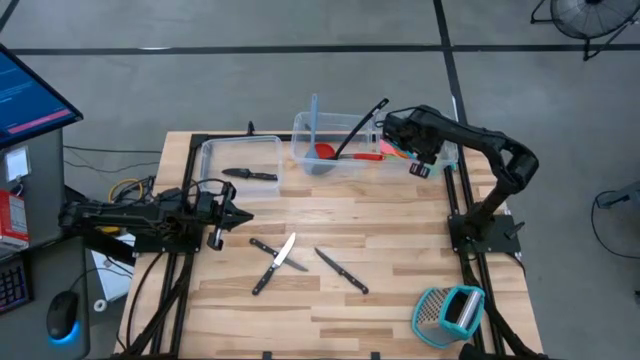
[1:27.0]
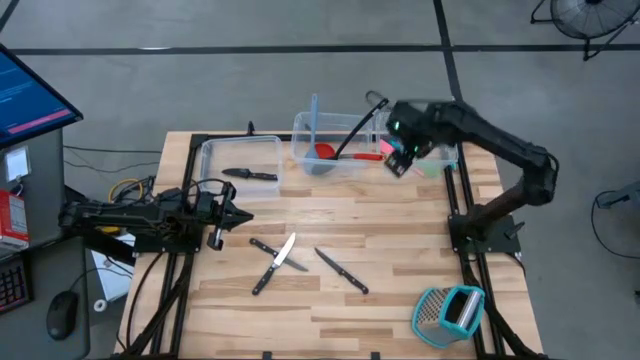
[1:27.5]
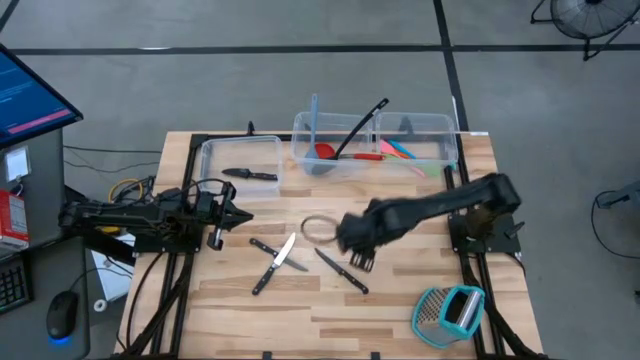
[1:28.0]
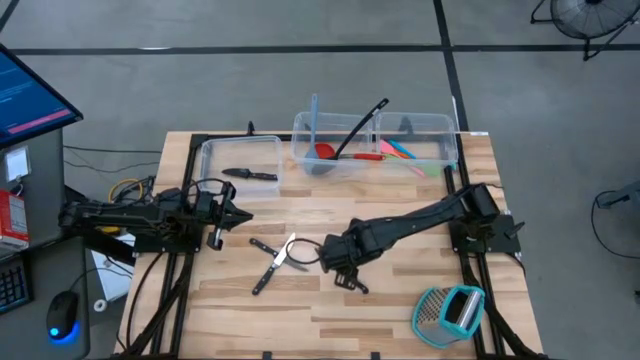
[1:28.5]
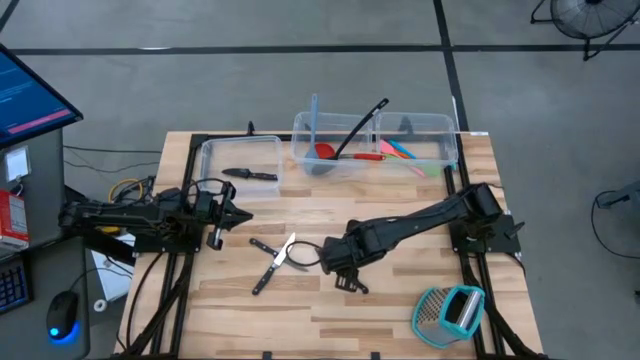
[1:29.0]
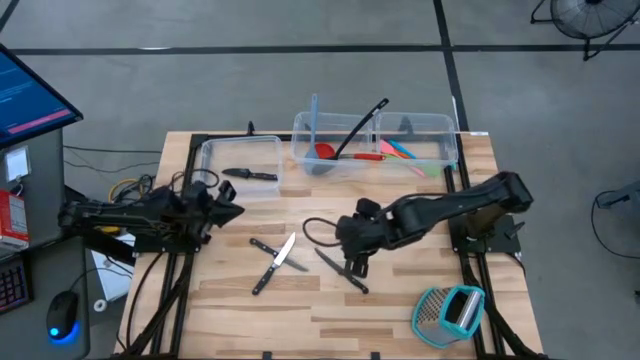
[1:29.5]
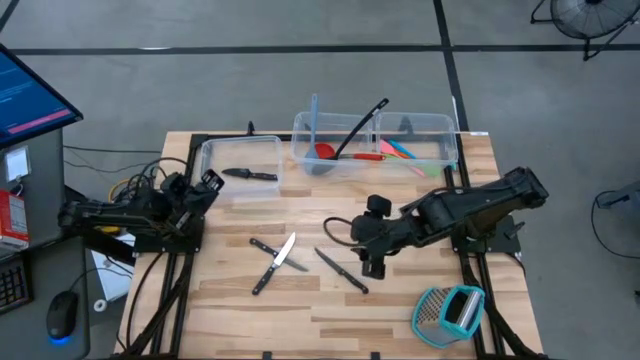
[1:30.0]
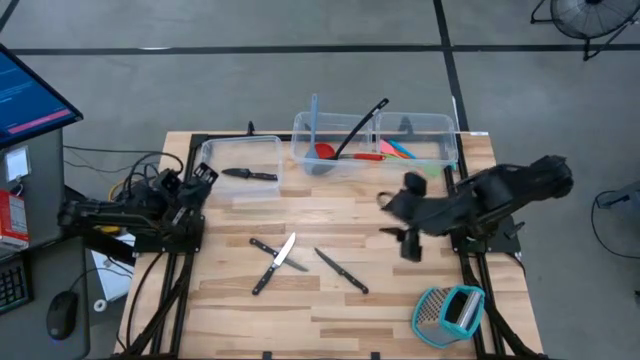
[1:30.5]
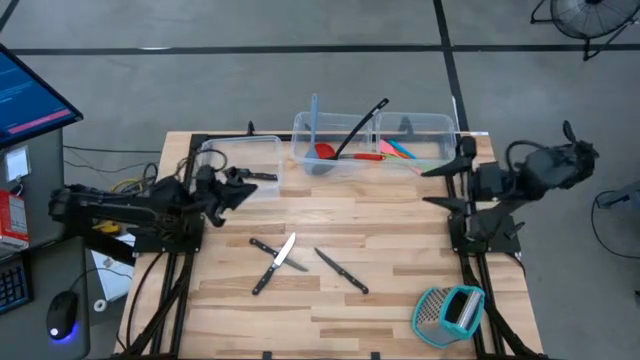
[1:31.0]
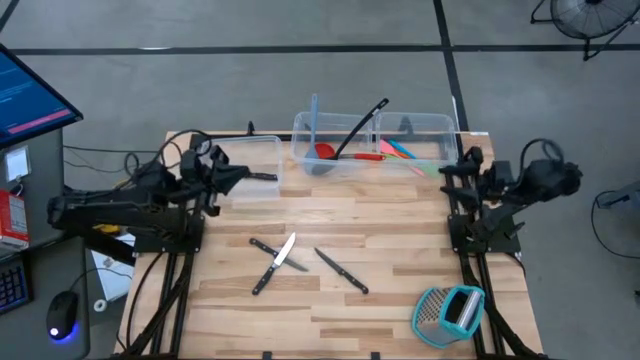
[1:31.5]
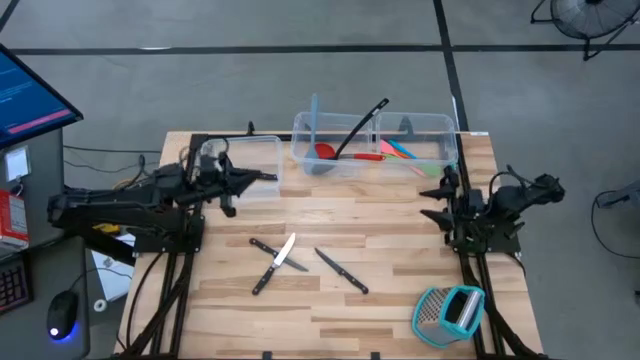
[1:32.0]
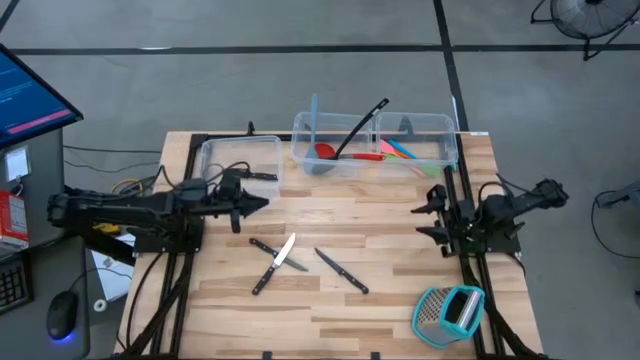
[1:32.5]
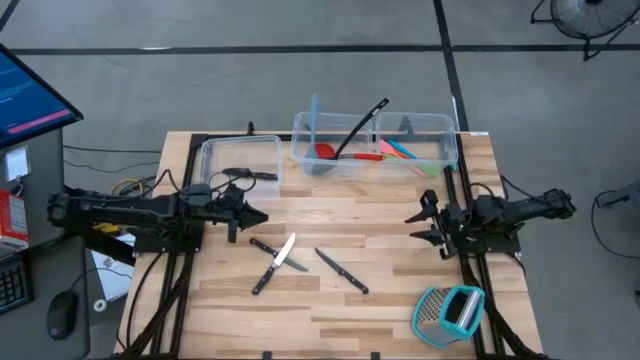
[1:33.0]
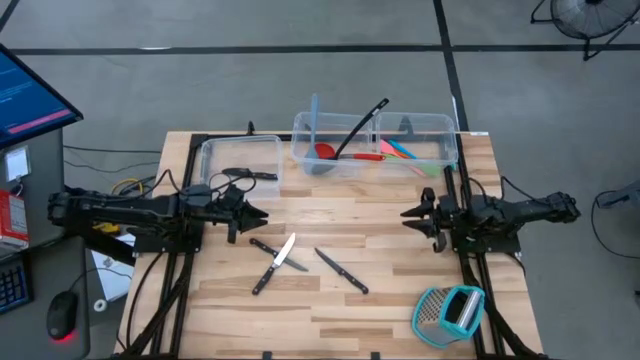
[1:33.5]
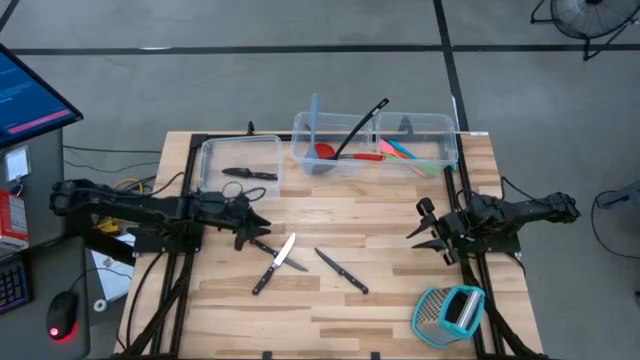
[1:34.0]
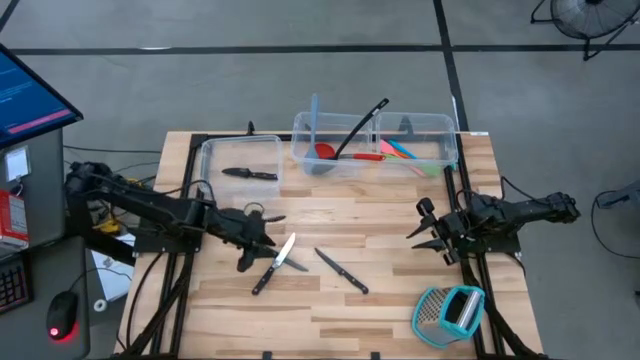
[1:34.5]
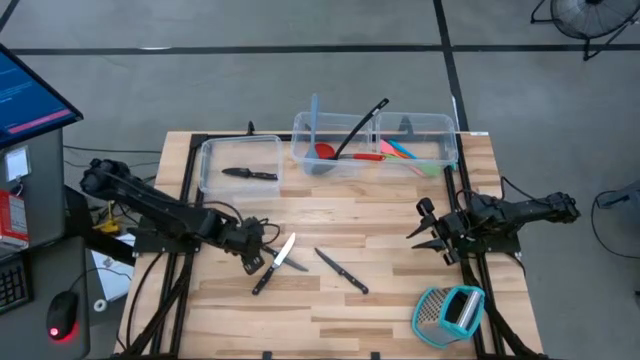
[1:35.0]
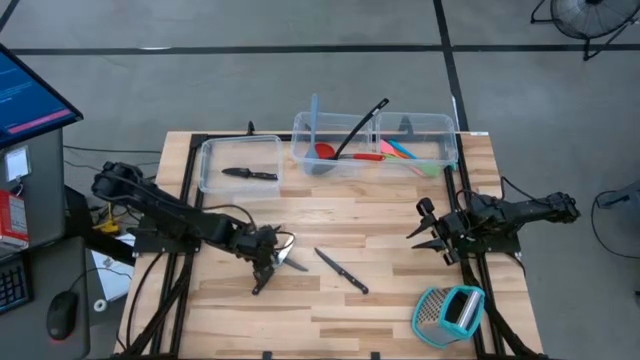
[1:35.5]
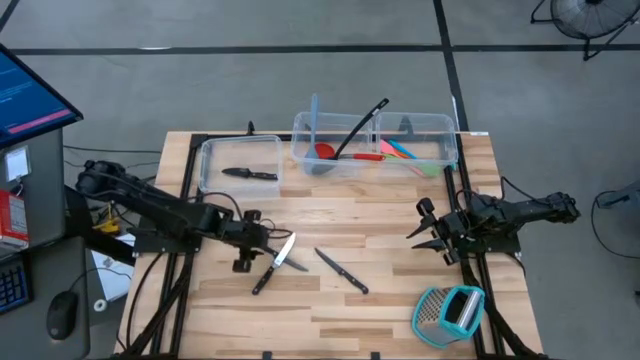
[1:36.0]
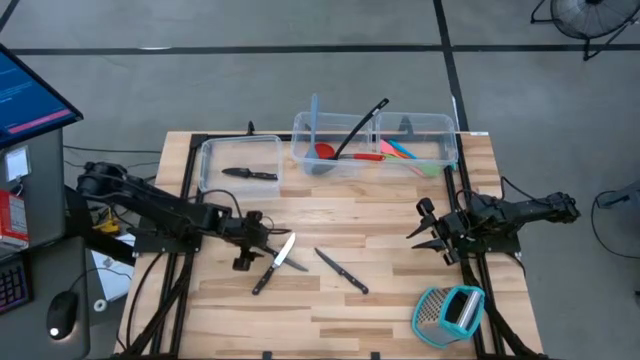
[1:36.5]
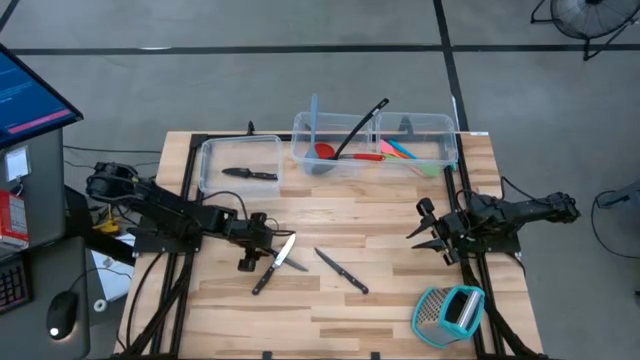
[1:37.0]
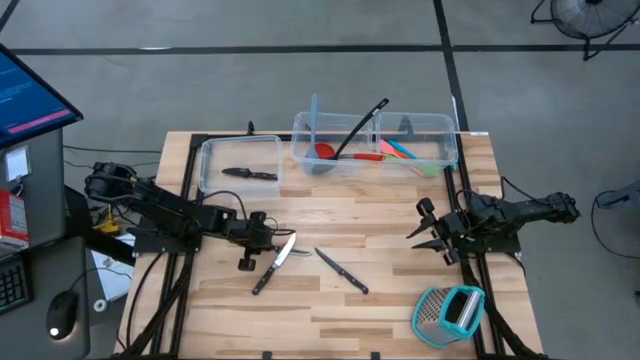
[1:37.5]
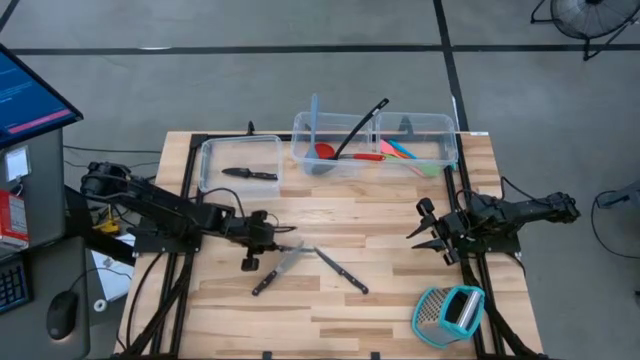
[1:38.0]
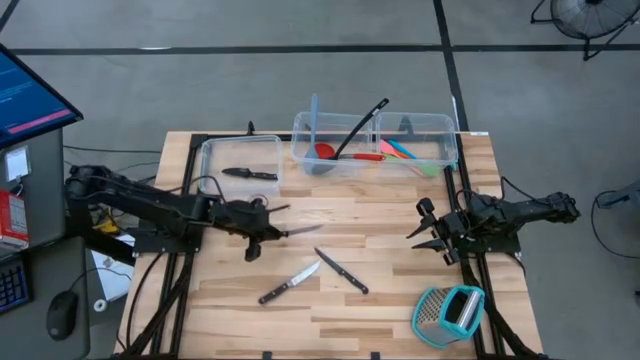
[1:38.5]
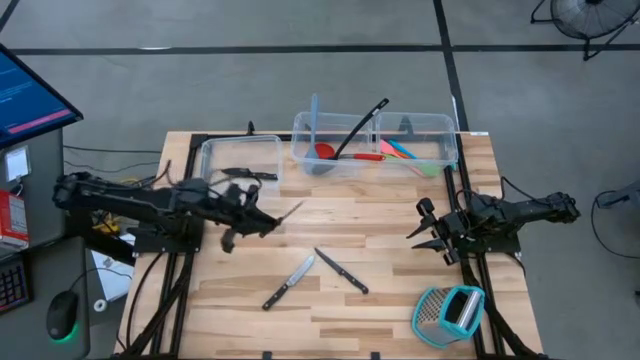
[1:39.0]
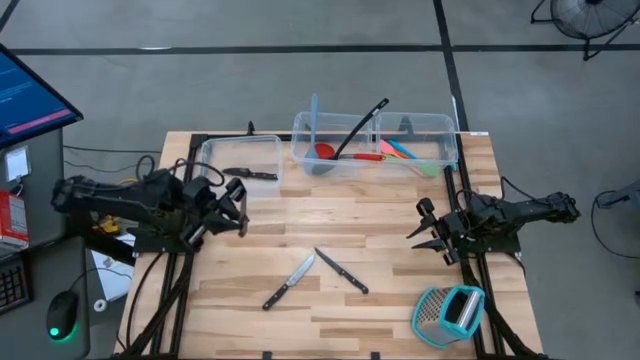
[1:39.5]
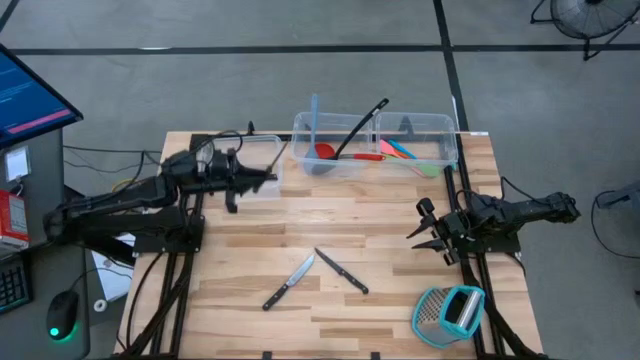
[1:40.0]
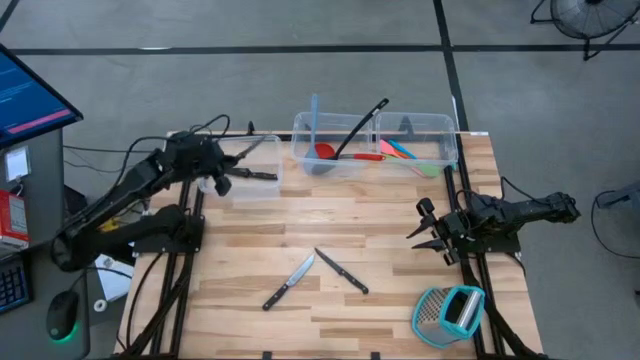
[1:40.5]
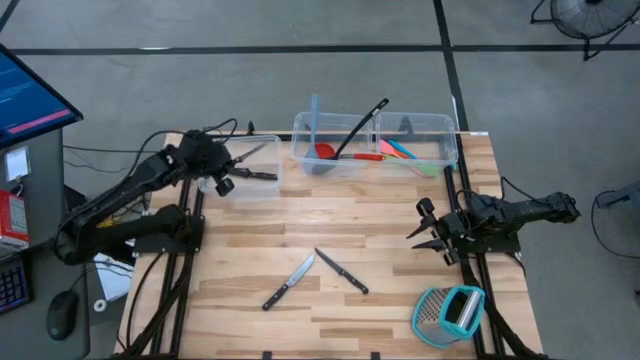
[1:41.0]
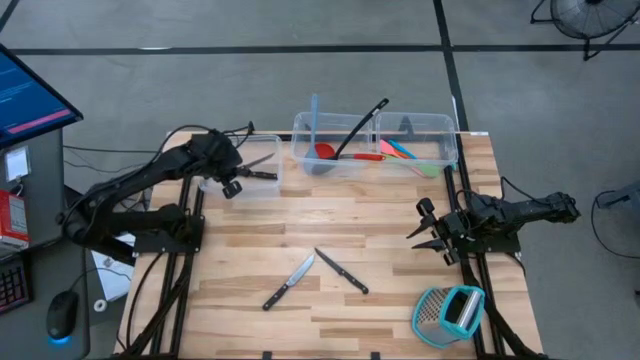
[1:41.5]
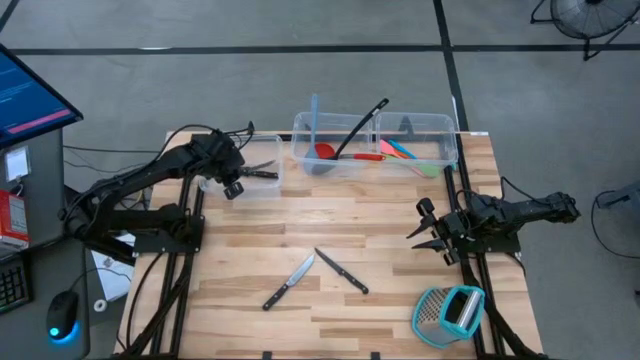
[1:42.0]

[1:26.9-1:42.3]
Task: Pick & Place Kitchen Items
Put the black knife into the top left transparent bin

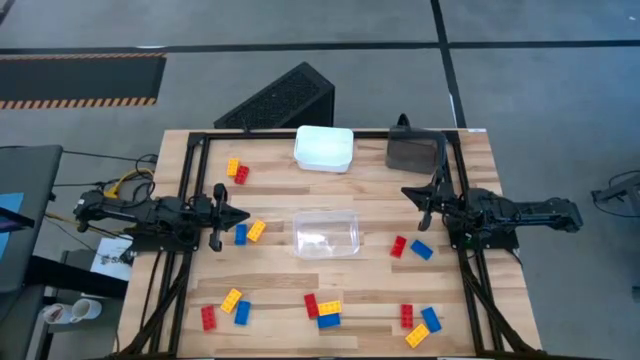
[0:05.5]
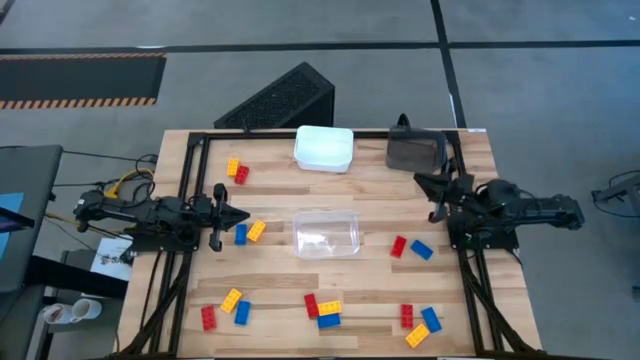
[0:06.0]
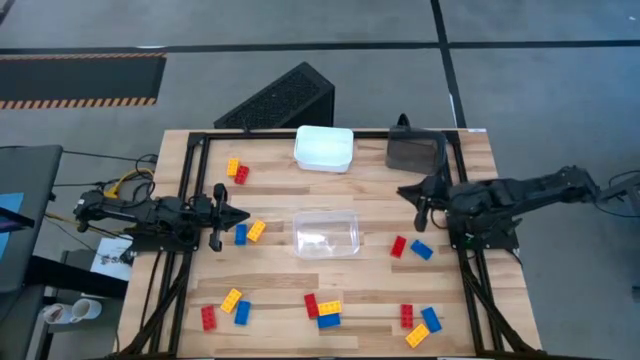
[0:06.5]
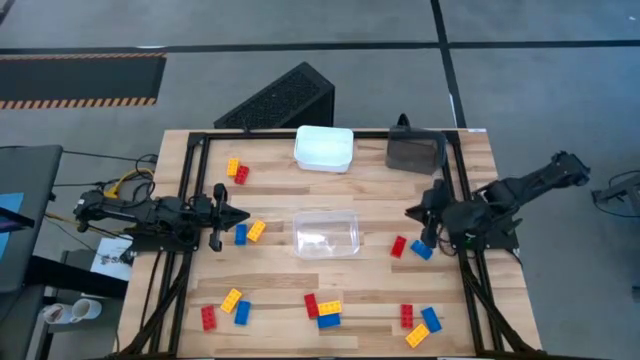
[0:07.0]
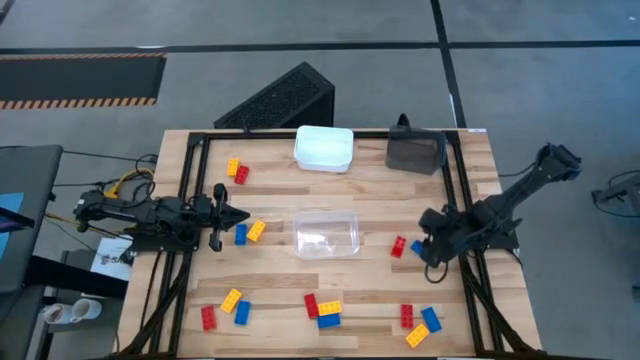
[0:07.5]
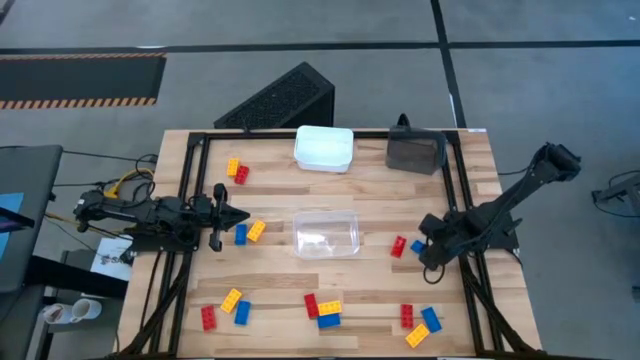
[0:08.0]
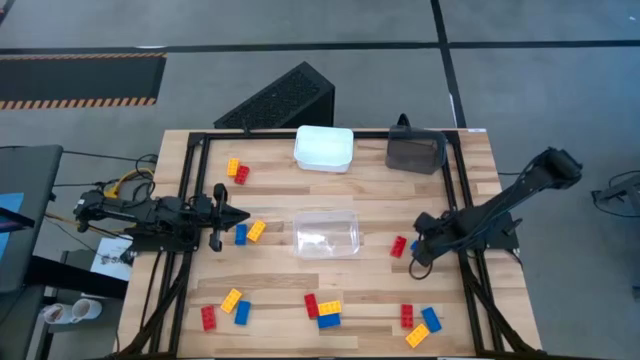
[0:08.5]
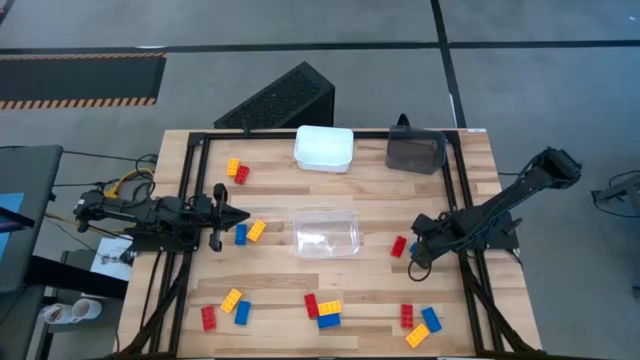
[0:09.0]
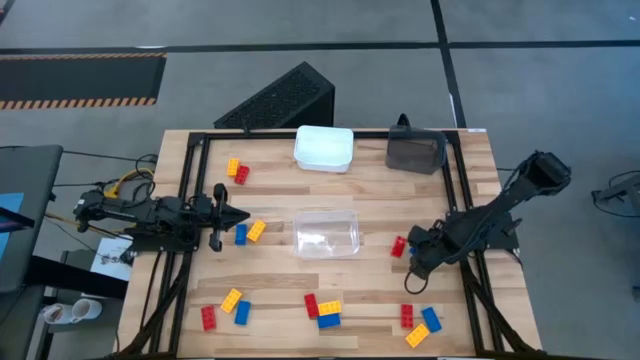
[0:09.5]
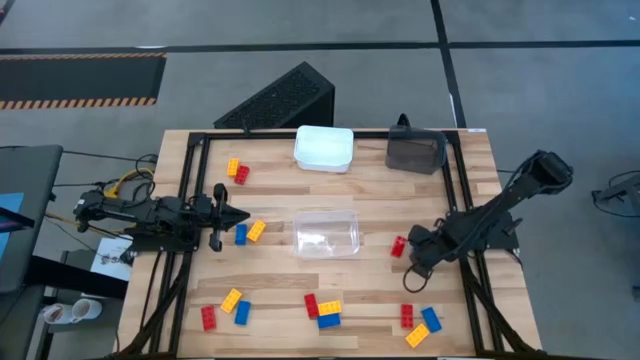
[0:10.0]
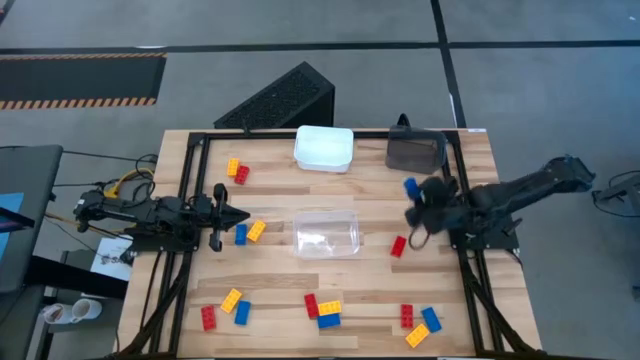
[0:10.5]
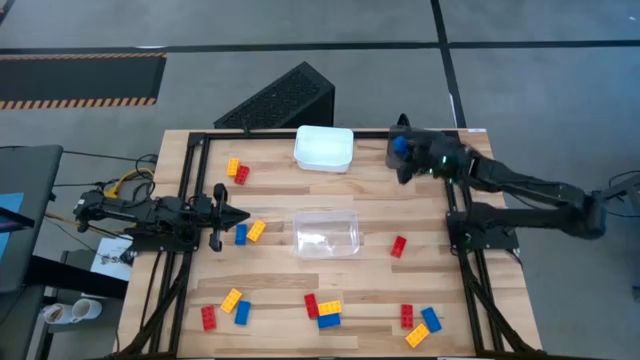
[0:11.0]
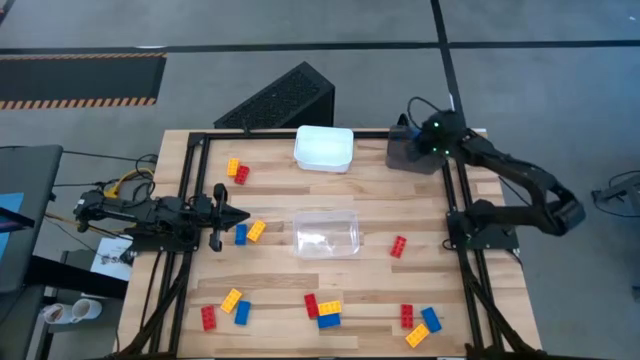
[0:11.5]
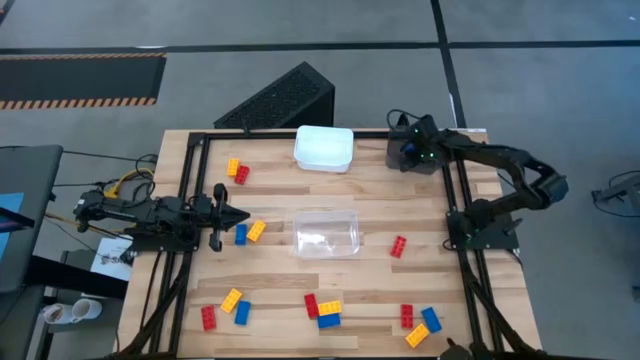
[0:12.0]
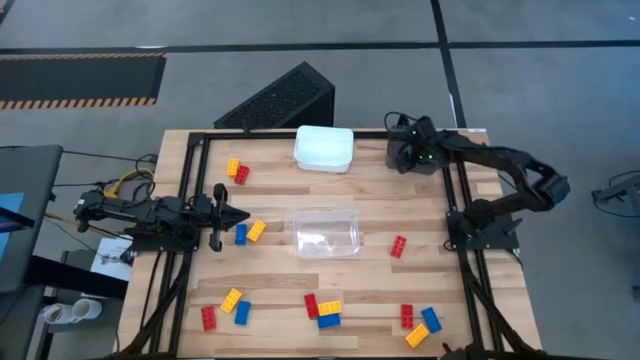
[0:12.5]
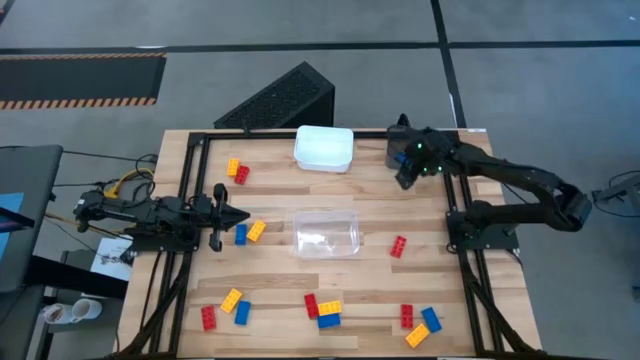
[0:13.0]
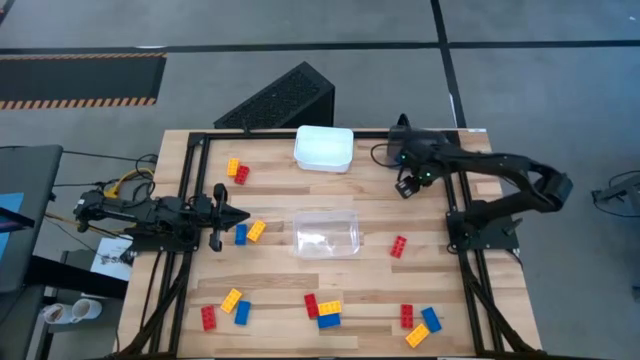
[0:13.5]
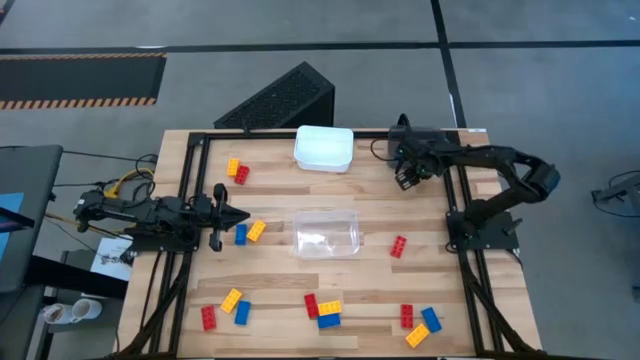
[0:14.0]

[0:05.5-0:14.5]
Task: Sort & place blocks by color
Put the blue game piece into the black bin
